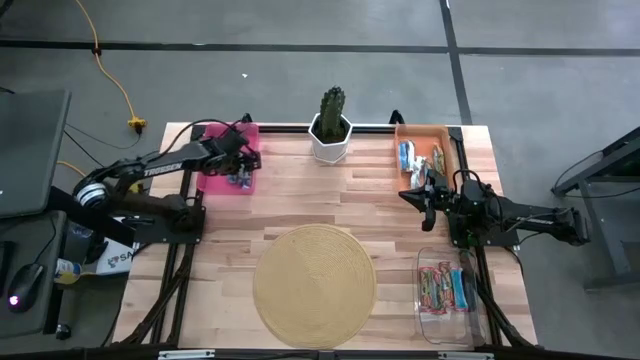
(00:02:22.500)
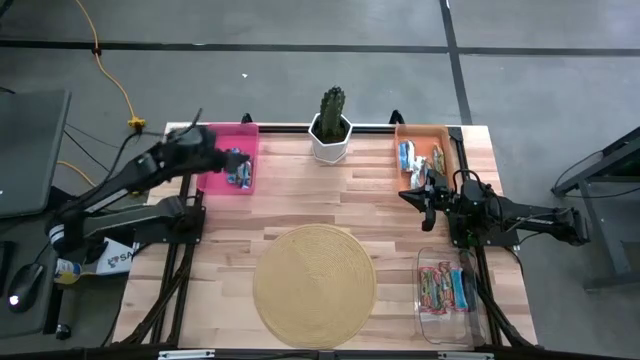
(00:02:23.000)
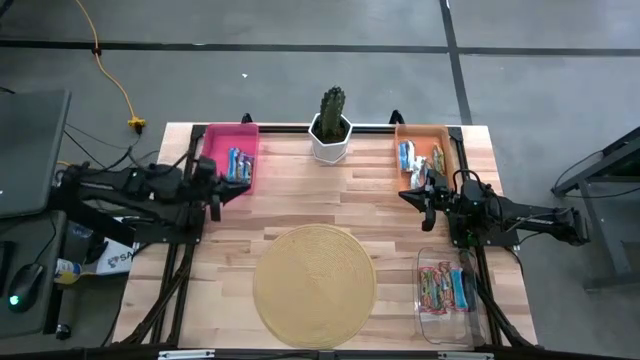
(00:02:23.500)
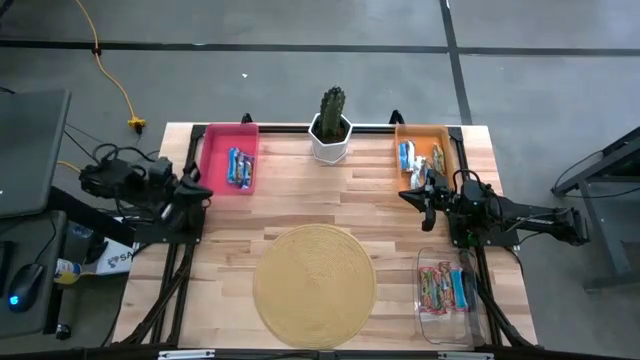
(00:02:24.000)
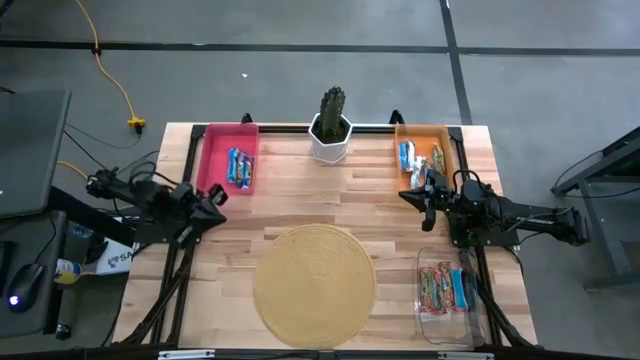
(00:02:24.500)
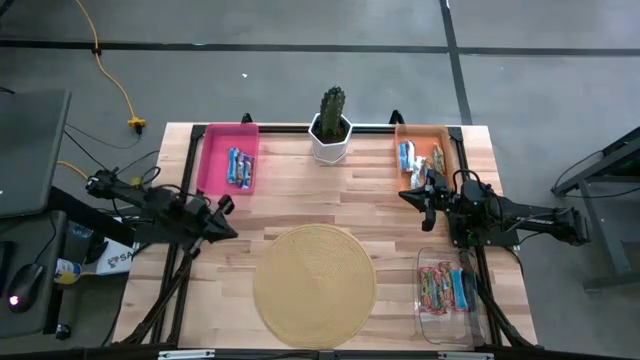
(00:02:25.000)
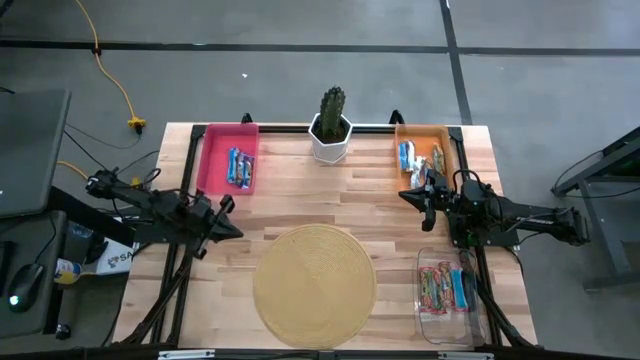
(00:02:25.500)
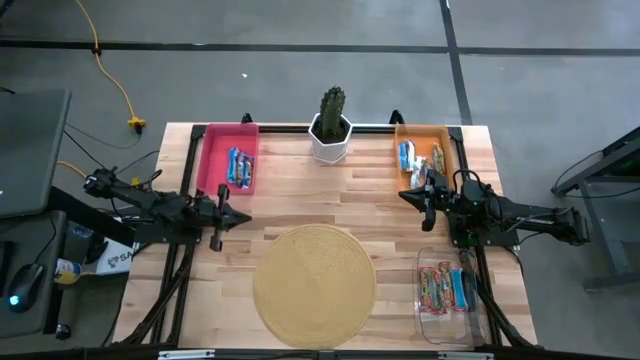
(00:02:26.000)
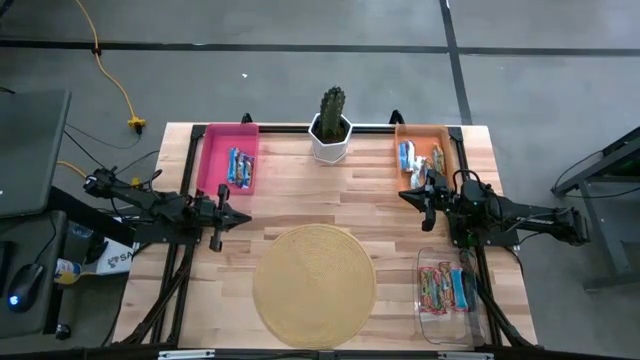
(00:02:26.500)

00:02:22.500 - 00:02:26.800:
Task: Pick and place Granola Bars by type
Return to Home Position

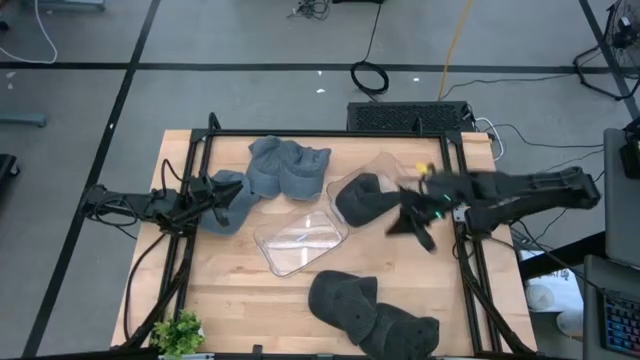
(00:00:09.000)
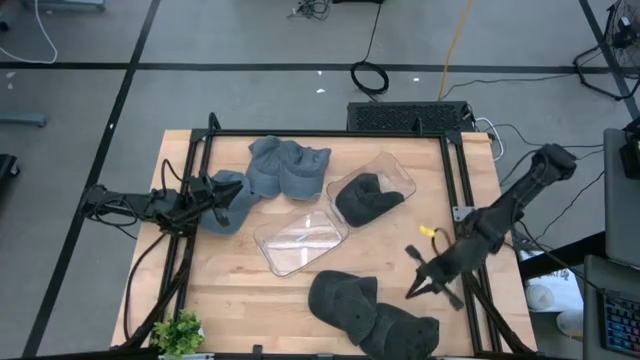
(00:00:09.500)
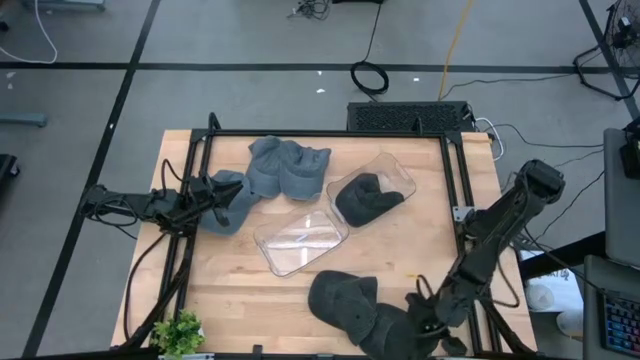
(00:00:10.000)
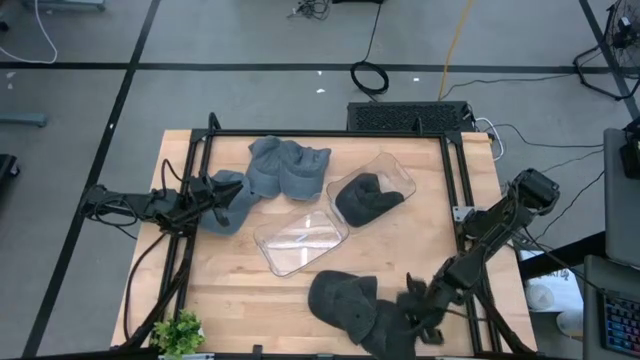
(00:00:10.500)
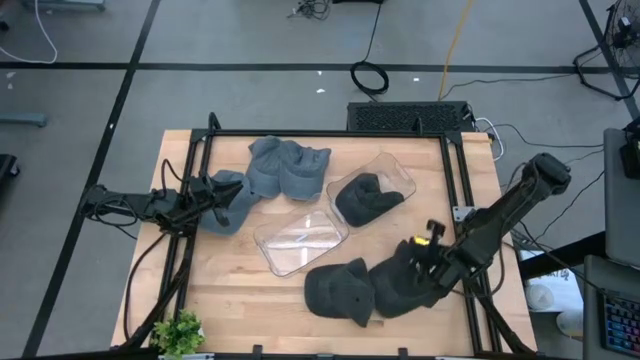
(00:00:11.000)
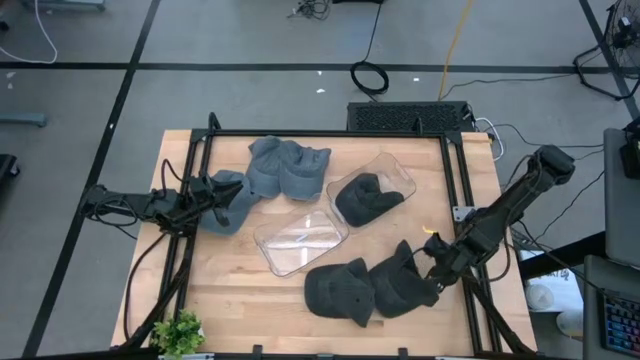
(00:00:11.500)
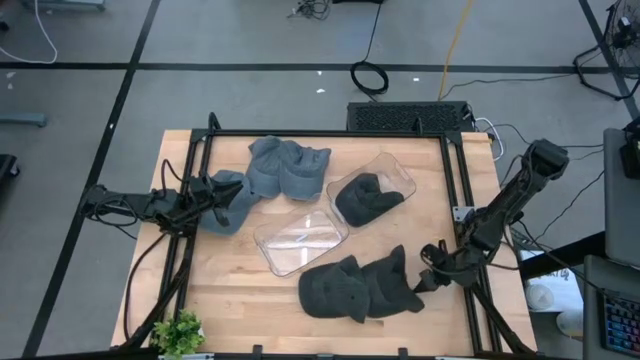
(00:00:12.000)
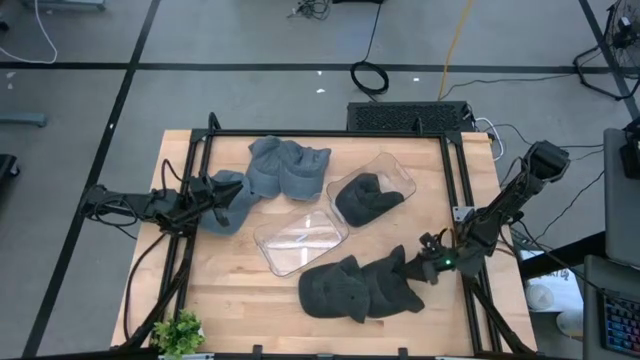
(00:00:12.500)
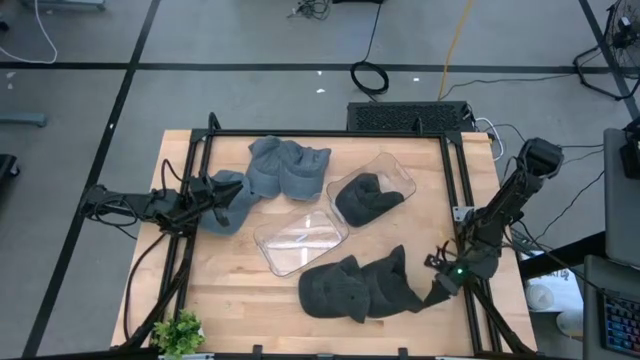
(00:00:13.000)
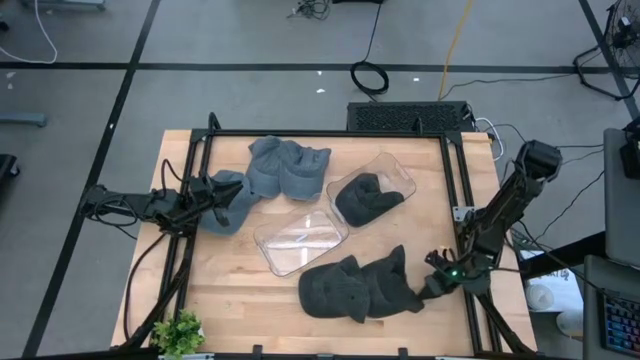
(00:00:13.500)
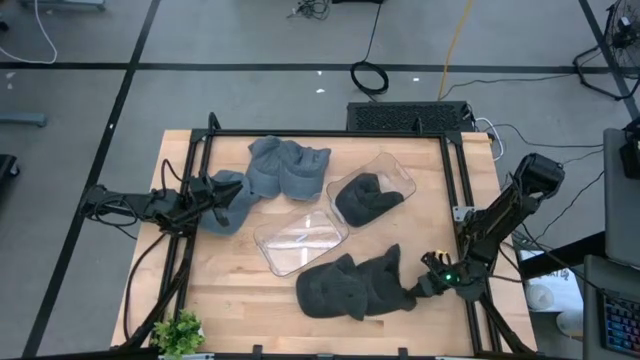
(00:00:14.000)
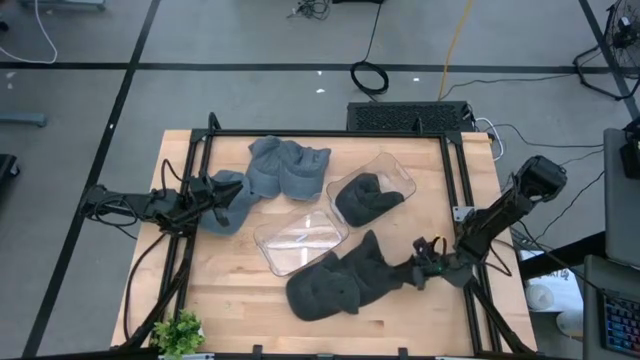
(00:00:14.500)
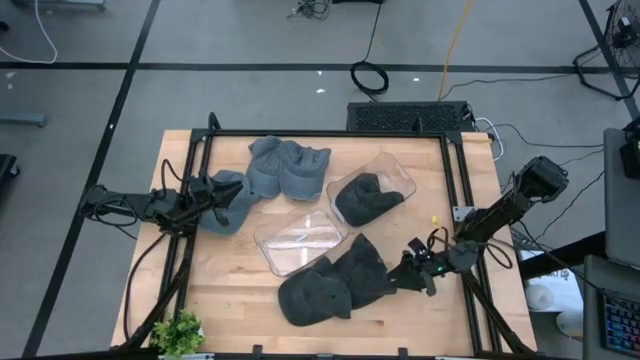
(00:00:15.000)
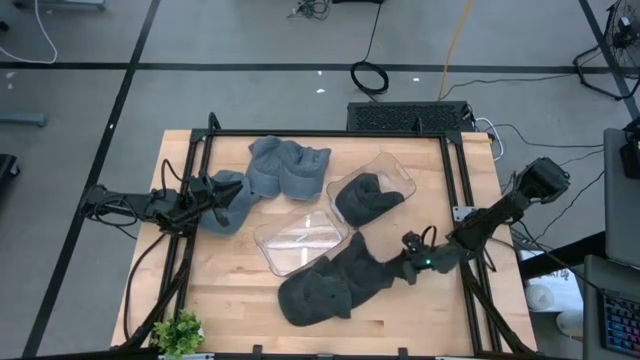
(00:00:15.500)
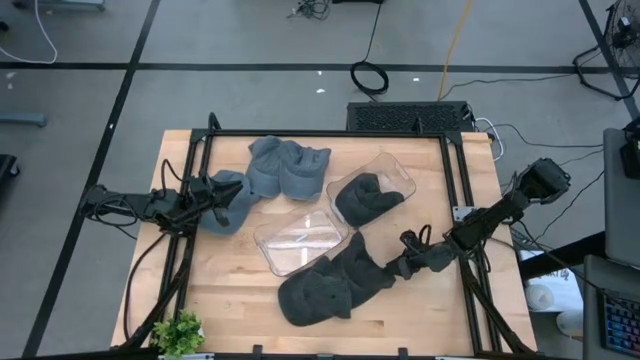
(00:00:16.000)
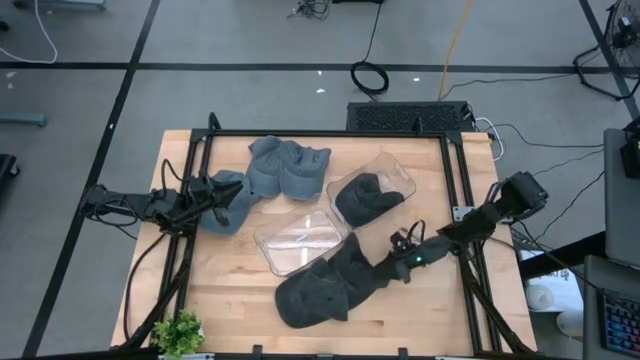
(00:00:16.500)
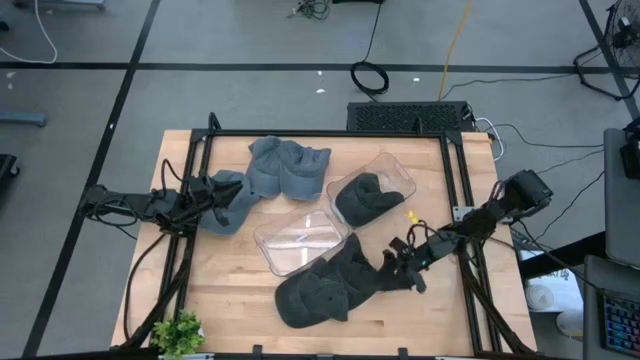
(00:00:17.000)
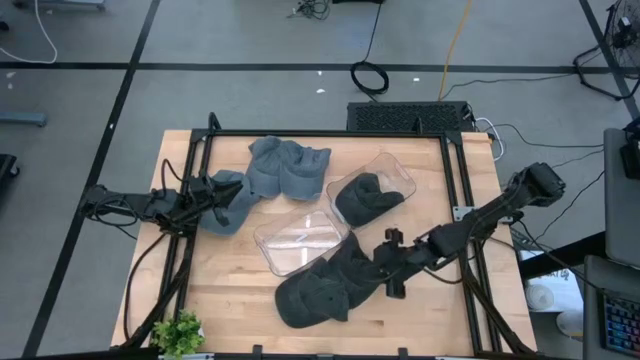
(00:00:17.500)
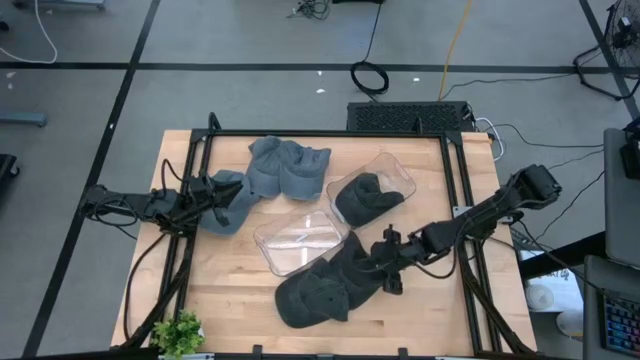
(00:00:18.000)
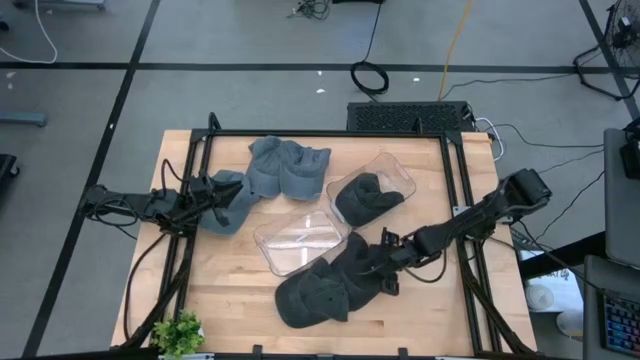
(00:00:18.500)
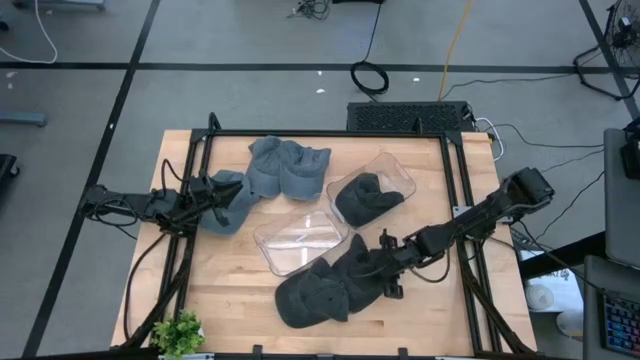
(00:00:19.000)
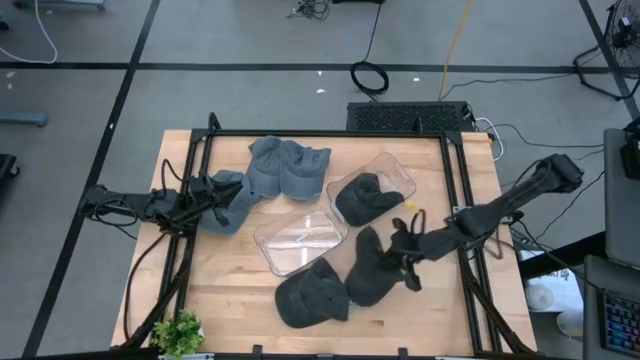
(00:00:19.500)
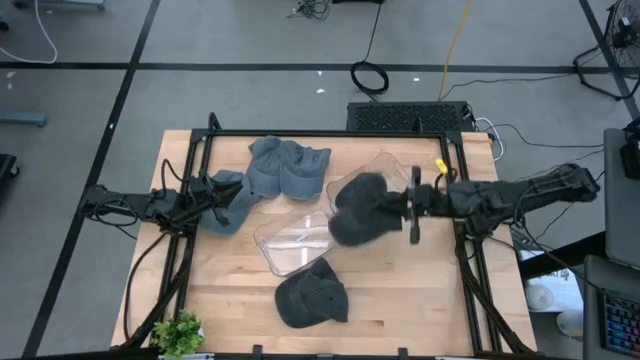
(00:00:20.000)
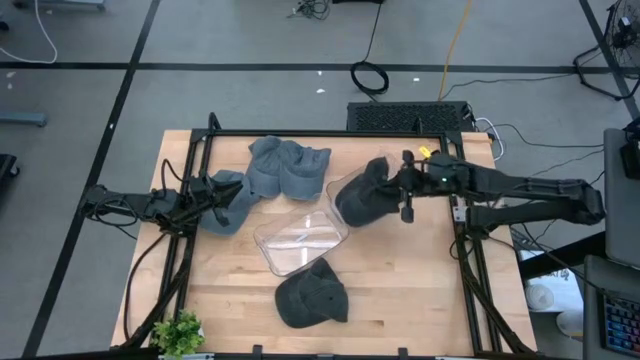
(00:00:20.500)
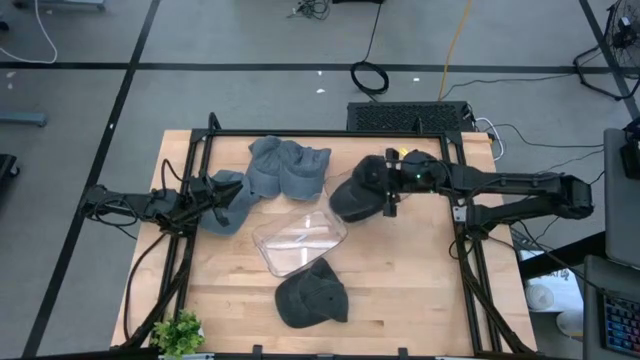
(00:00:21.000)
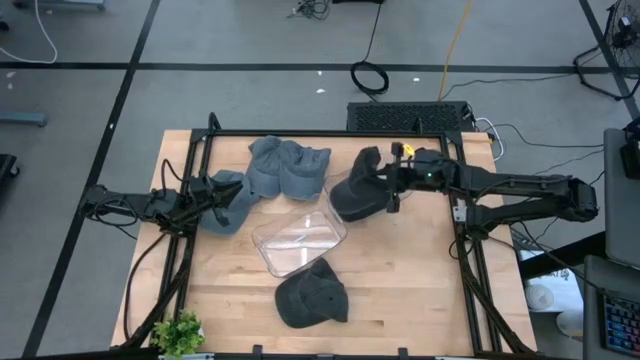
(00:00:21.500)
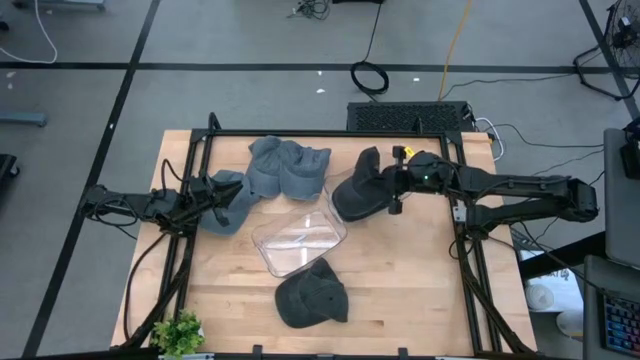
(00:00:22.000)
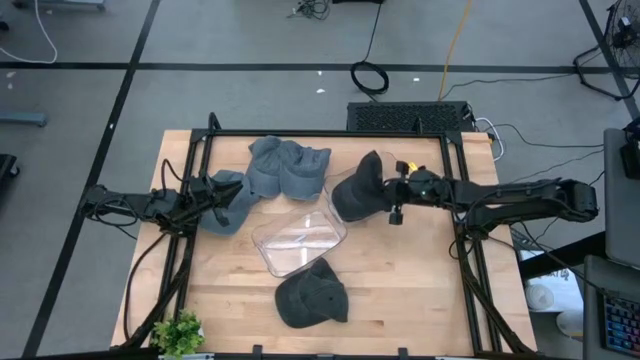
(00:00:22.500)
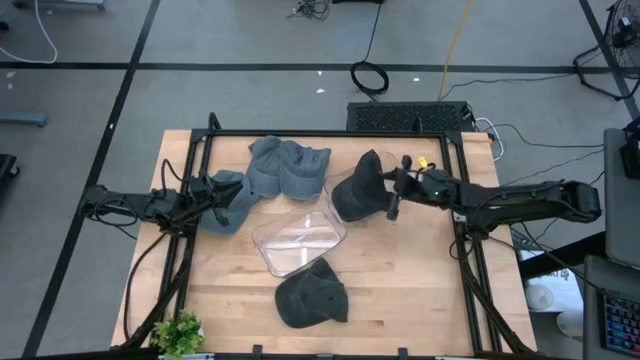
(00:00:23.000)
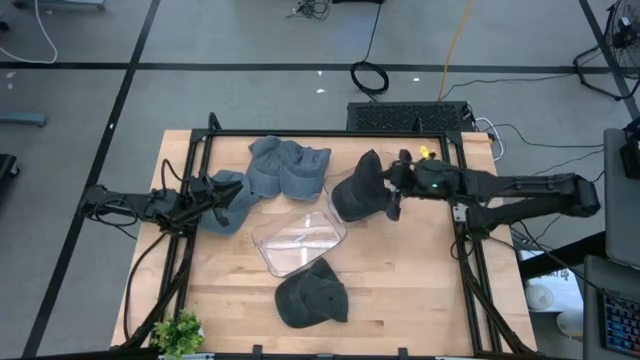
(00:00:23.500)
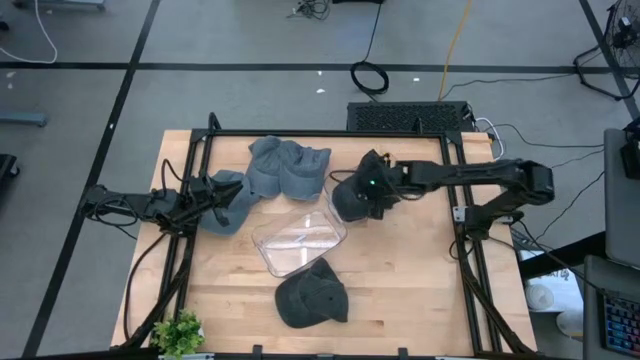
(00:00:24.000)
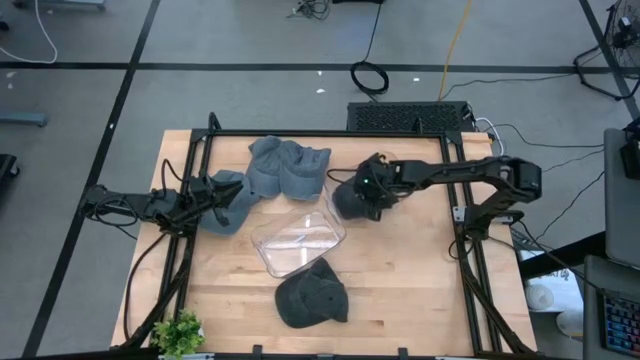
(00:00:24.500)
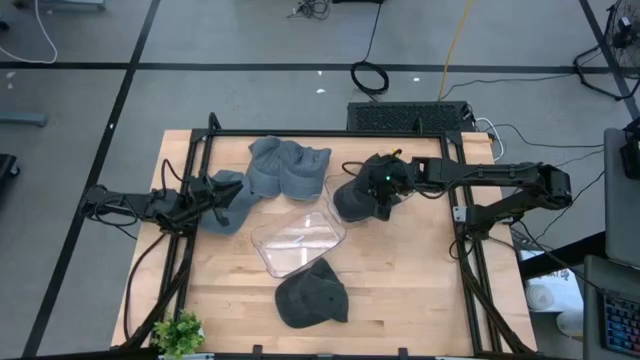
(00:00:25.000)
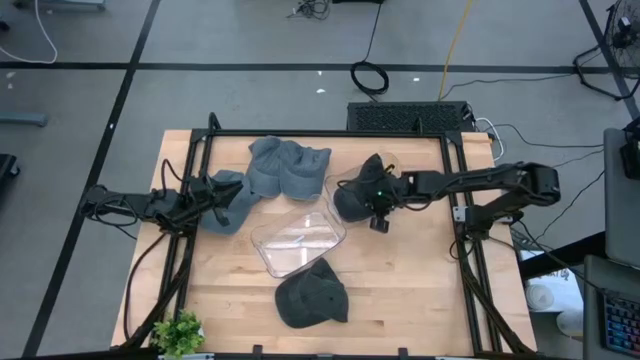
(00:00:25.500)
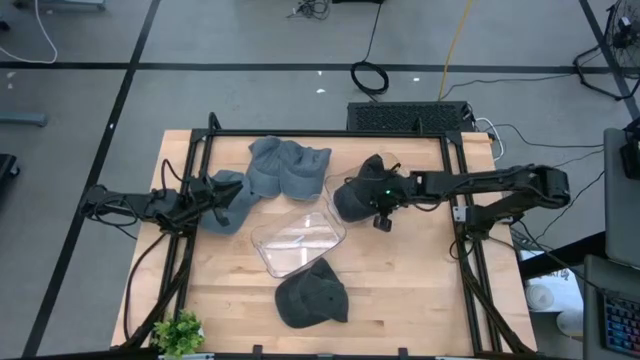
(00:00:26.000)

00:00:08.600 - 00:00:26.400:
Task: Pick & Place hat
Put the right black cap into the top transparent bin
